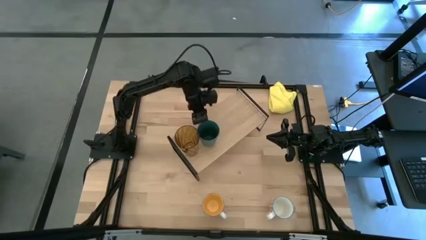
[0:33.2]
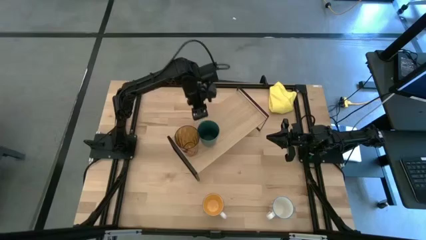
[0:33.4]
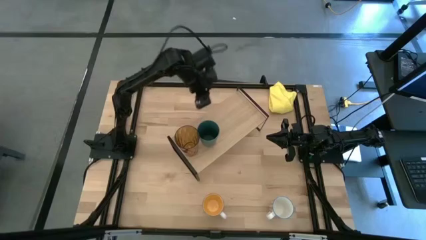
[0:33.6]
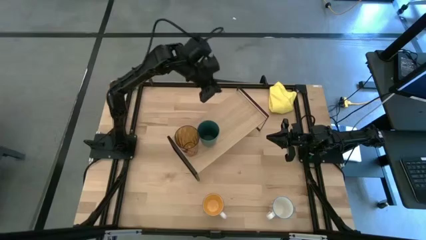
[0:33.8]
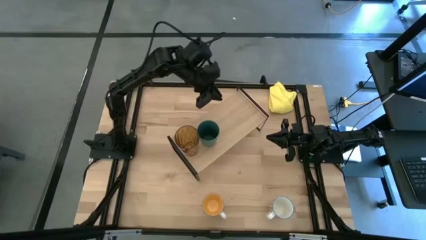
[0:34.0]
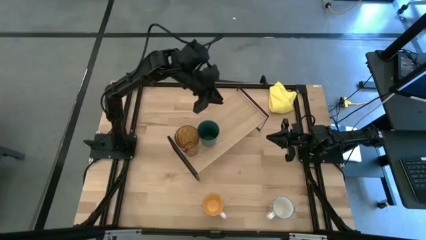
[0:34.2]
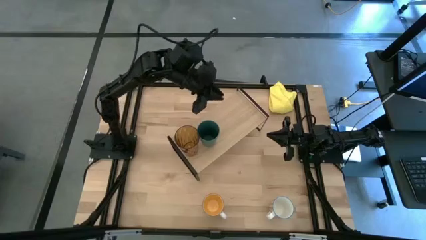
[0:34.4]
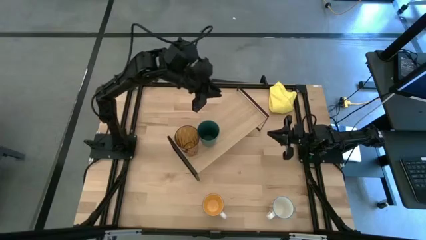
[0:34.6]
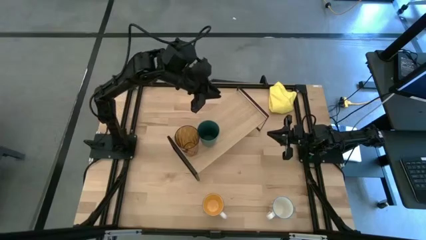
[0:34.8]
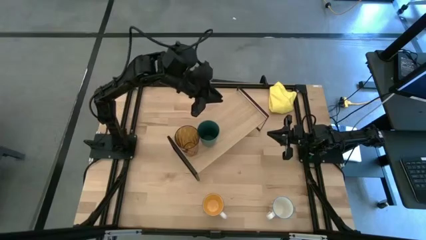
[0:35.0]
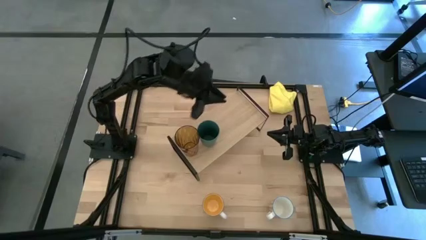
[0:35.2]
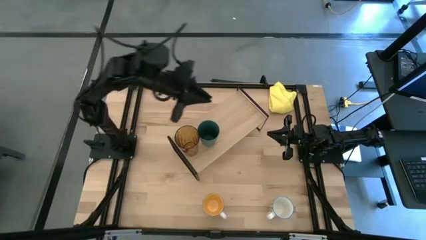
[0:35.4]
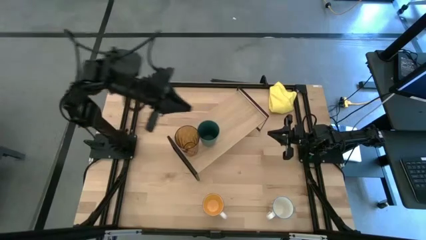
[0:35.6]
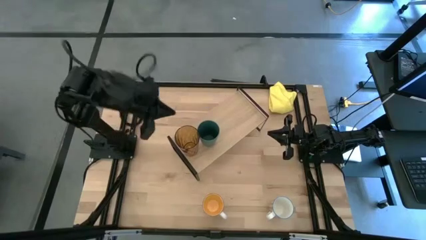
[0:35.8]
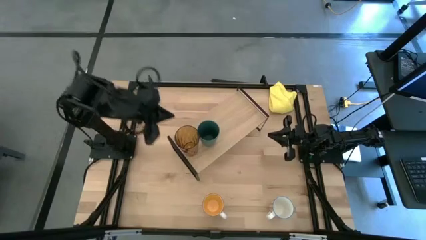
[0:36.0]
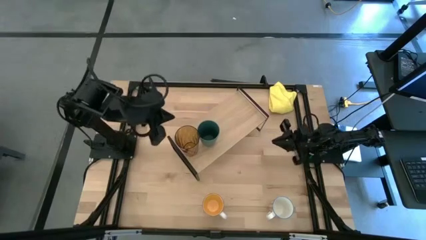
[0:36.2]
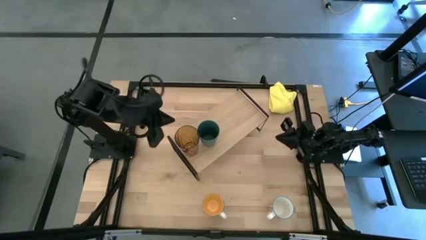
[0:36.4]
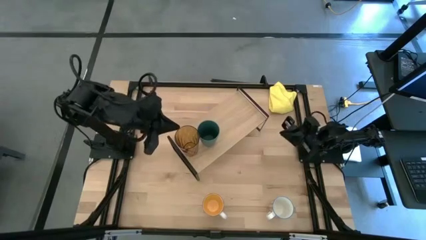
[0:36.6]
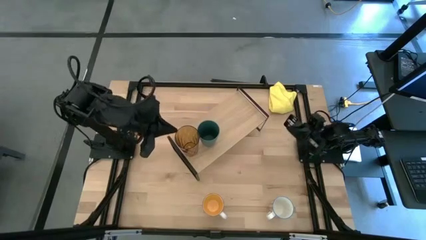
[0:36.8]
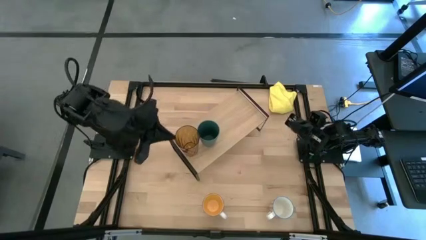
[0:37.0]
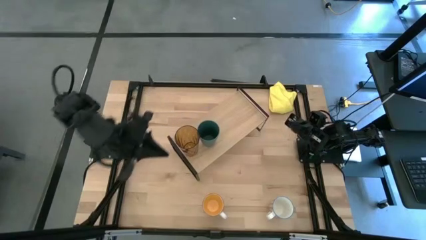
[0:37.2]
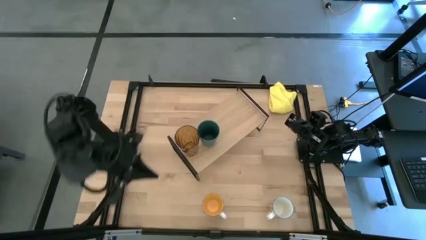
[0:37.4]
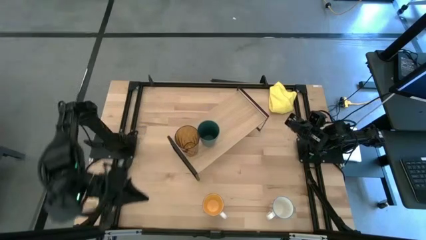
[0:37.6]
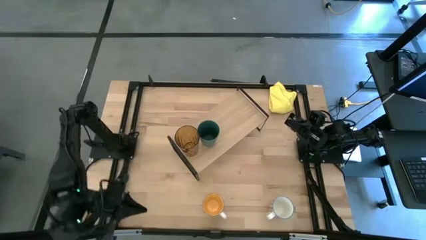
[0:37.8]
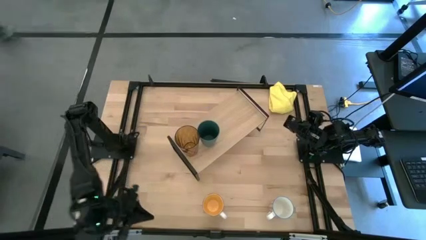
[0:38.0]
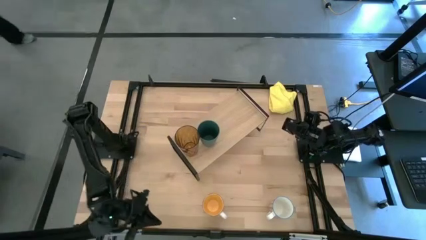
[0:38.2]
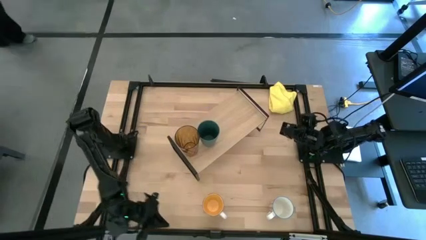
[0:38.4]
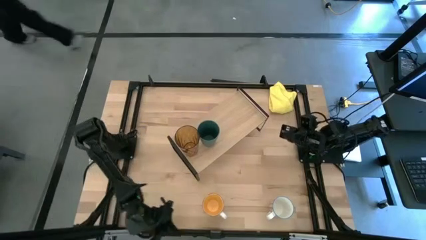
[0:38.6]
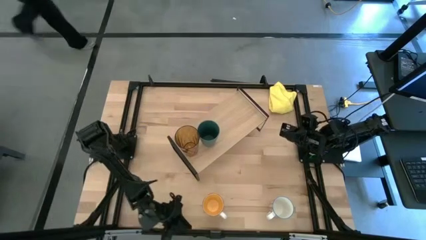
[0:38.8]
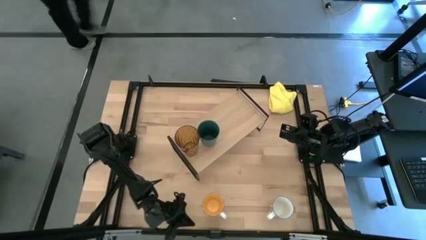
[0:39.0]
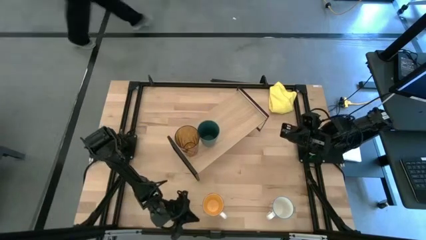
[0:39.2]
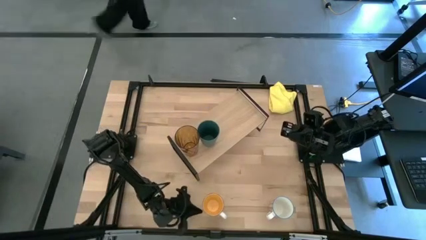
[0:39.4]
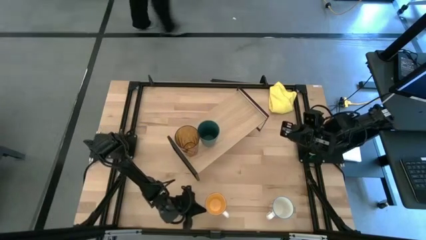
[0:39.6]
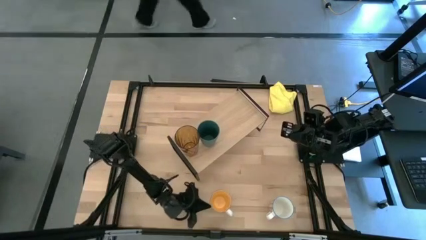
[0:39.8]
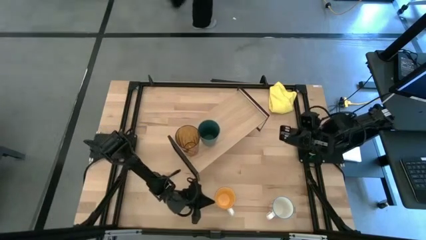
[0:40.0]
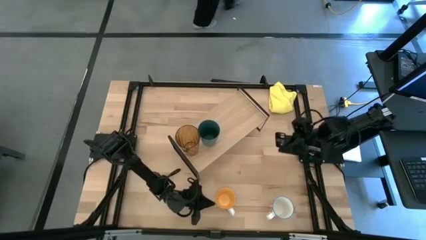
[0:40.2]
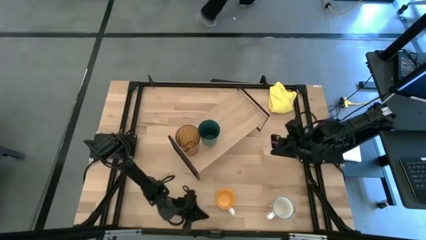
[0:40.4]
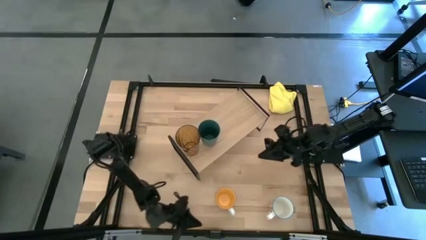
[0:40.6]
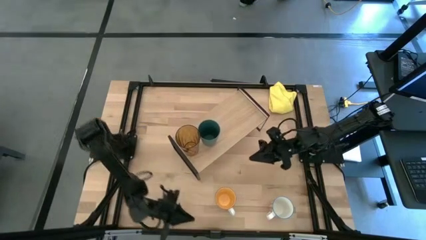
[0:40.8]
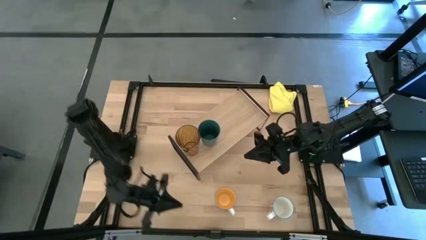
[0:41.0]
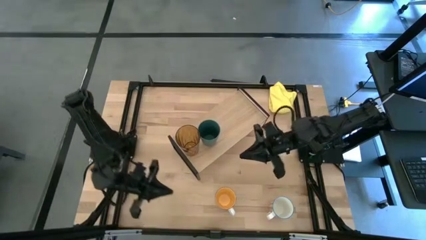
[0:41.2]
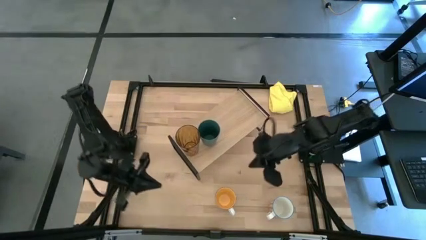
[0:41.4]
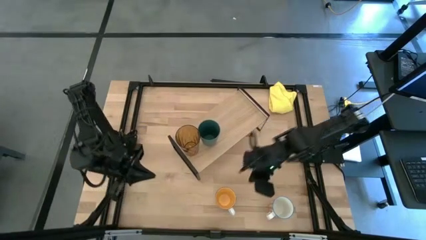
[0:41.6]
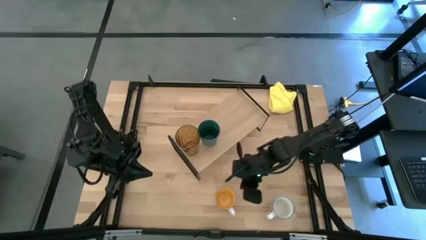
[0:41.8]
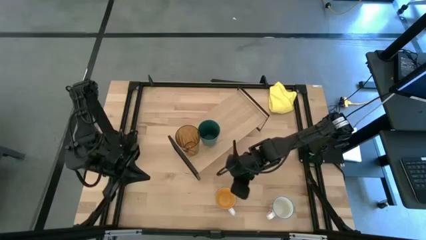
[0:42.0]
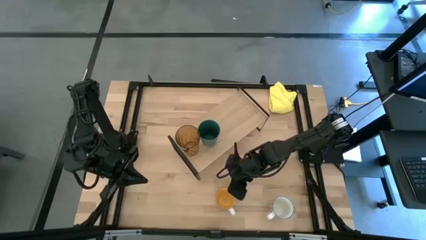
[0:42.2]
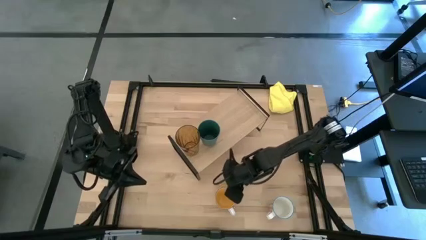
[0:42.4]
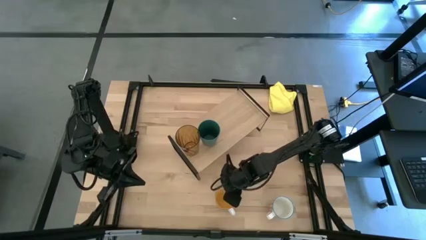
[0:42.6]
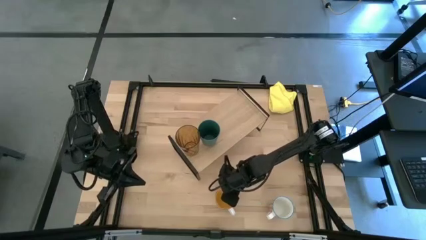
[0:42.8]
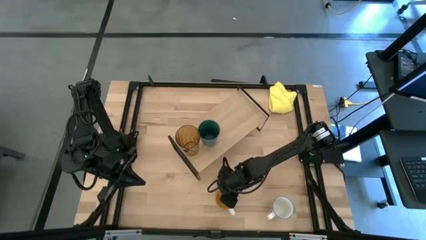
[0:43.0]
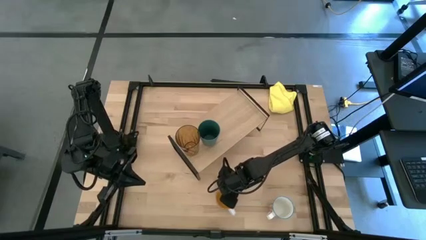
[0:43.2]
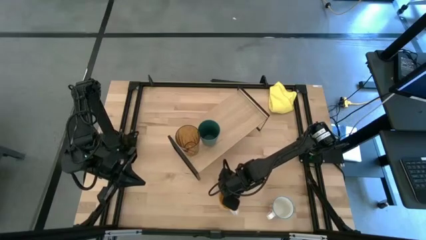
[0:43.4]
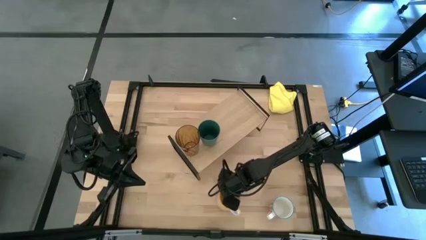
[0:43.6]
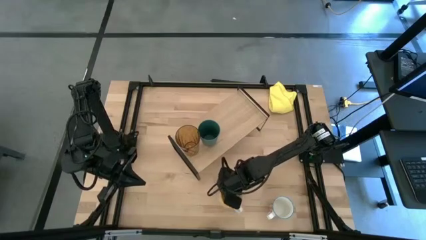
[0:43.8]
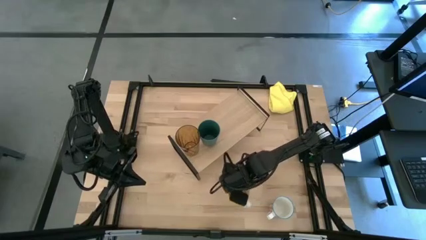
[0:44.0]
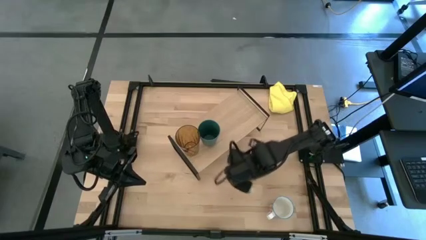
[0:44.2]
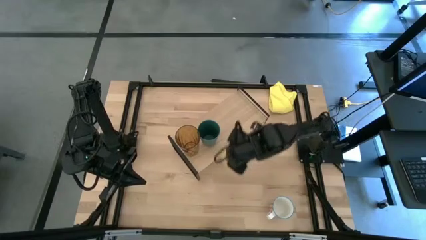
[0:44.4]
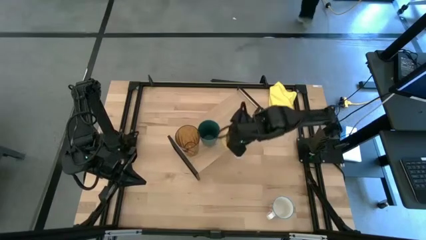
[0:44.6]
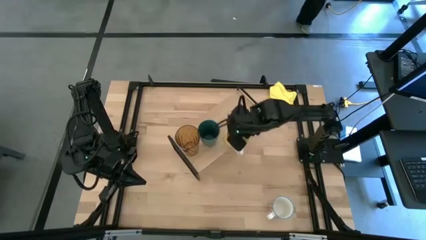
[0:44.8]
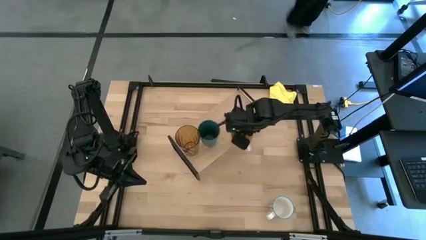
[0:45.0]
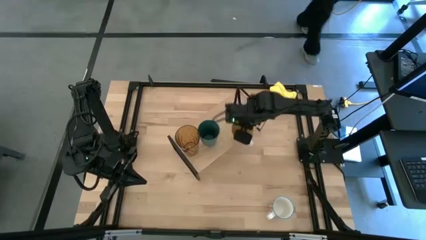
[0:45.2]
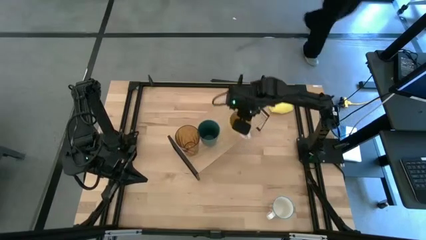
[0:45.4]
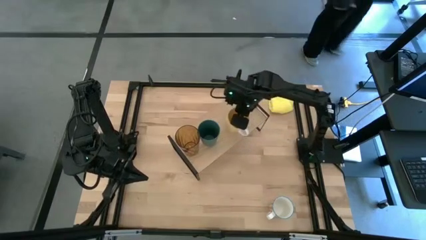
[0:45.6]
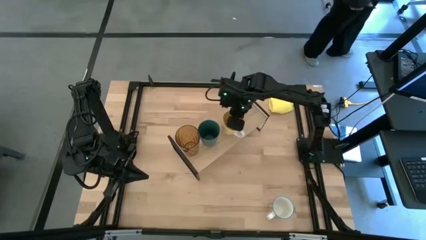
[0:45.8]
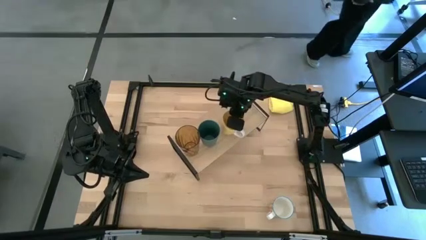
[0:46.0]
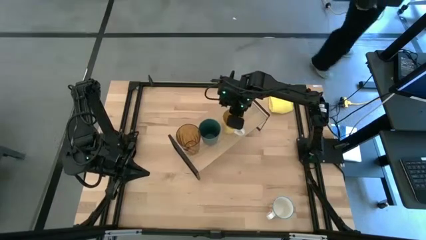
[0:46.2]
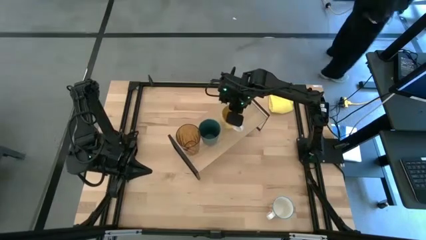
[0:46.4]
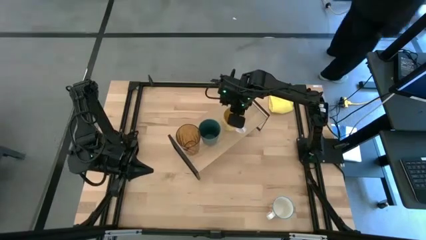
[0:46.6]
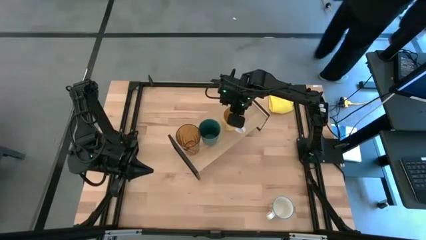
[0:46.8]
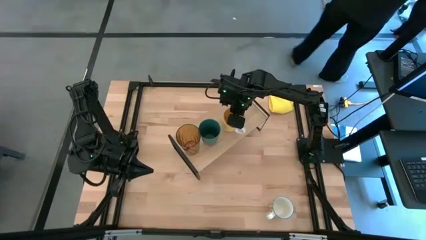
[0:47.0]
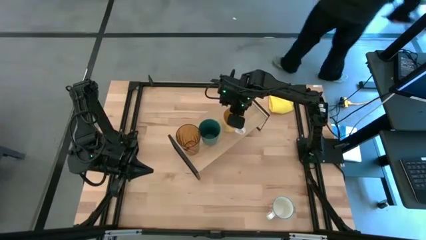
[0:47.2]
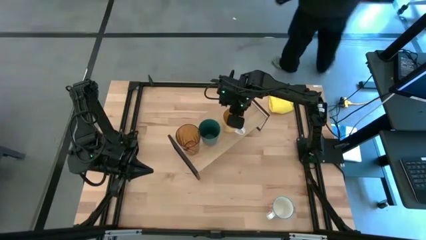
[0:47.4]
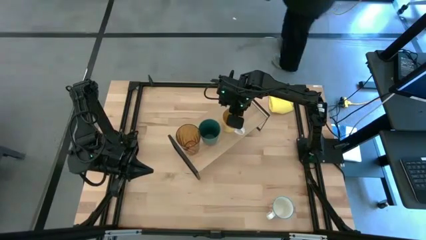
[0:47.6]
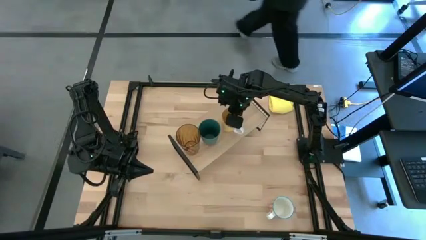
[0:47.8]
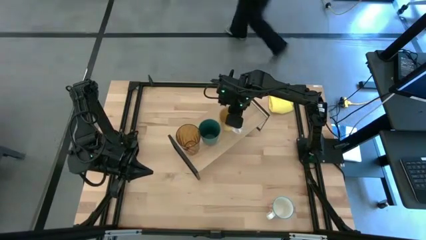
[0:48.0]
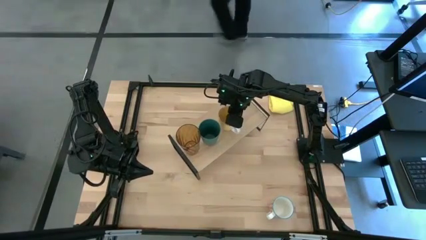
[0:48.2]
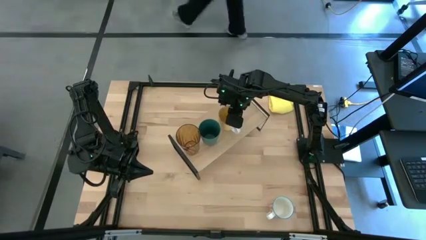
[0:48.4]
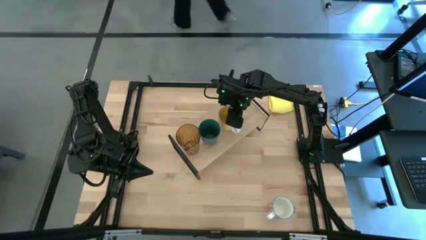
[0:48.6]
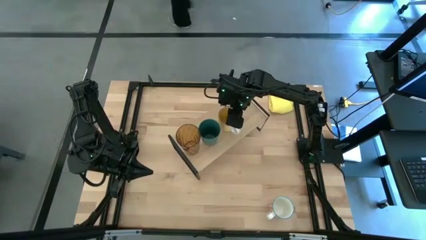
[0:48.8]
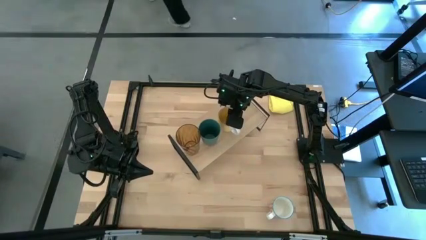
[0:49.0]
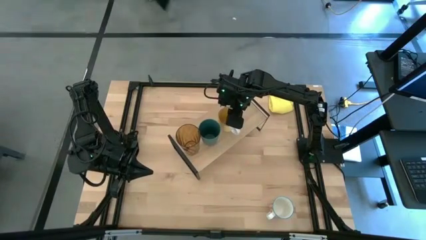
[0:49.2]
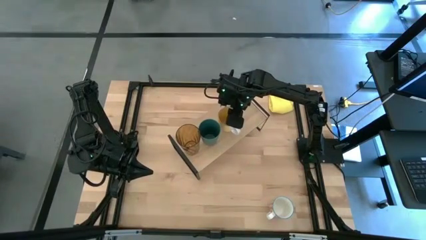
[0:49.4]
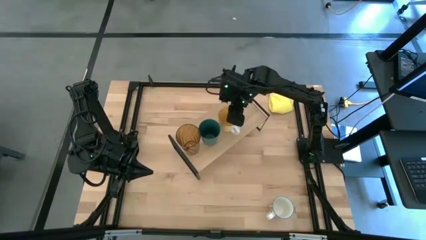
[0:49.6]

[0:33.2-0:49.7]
Task: Stack small to large cups/mugs on shelf
Put the yellow mug on the shelf

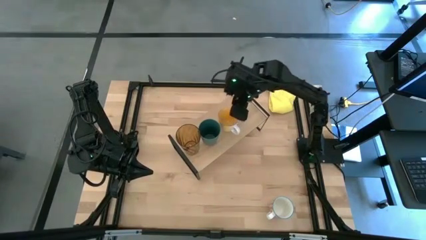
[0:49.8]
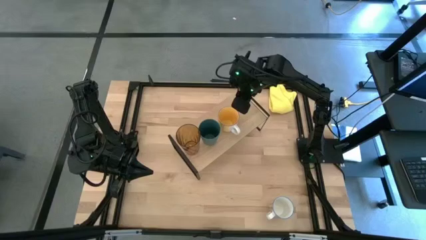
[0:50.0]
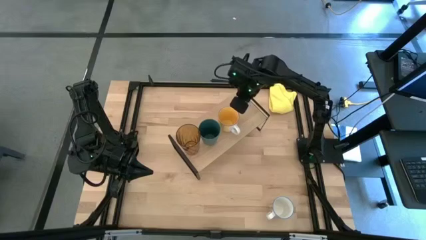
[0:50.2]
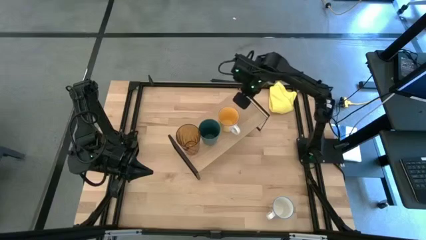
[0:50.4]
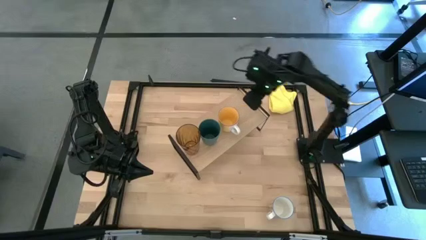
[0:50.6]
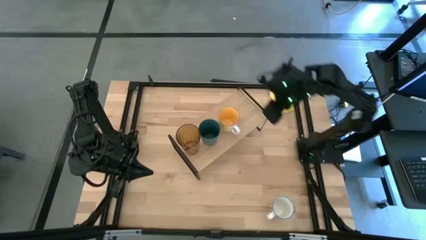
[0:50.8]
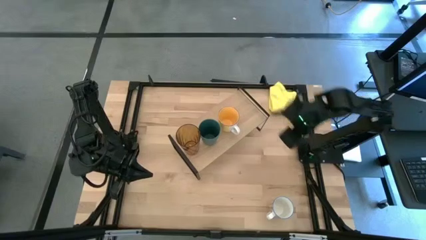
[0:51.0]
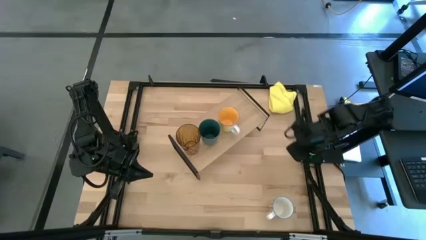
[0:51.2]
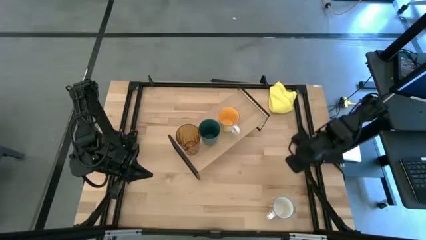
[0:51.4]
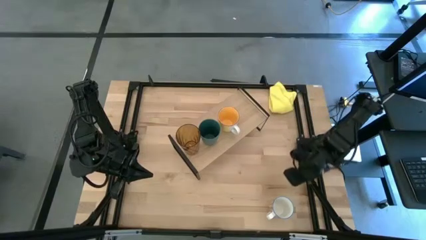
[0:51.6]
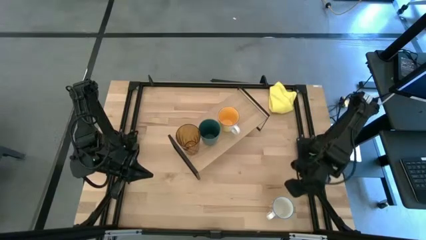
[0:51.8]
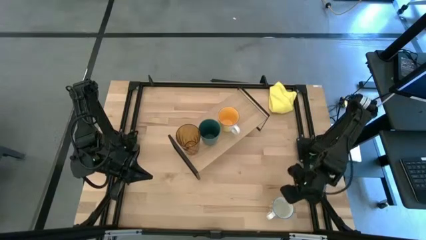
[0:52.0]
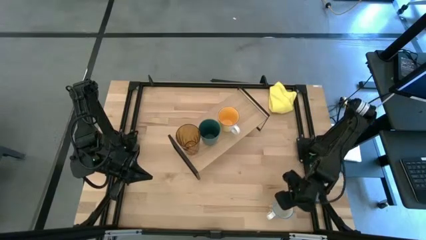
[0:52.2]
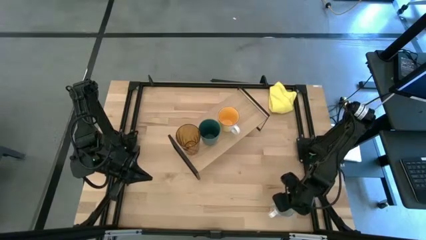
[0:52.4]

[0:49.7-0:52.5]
Put the red patterned mug on the shelf
